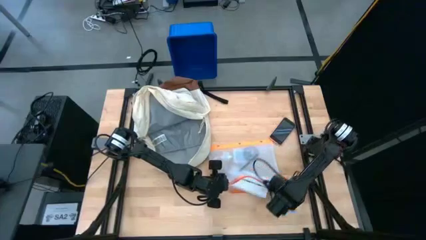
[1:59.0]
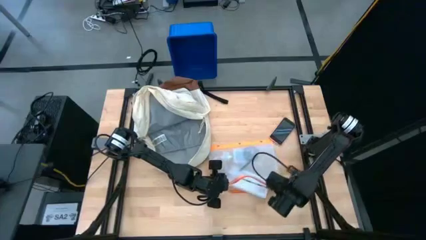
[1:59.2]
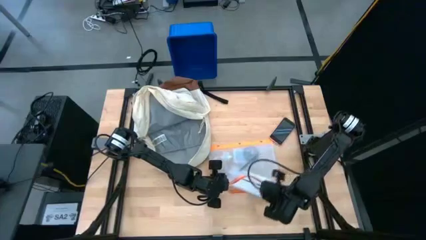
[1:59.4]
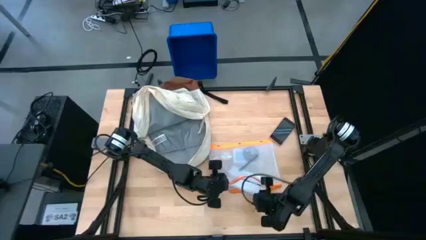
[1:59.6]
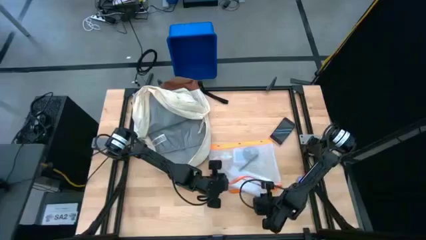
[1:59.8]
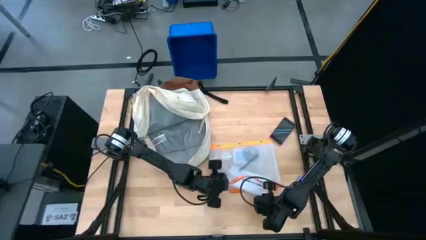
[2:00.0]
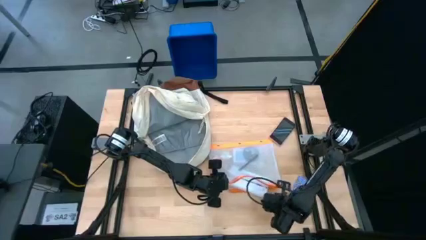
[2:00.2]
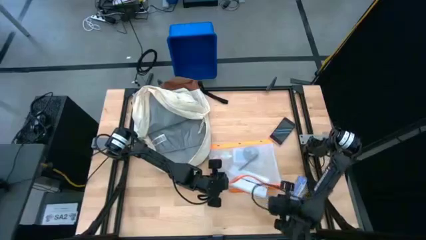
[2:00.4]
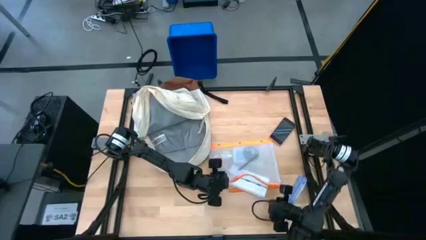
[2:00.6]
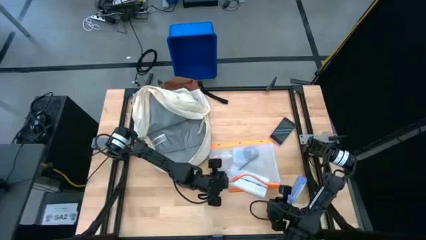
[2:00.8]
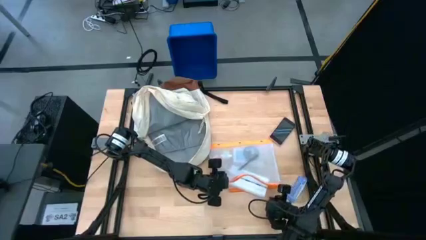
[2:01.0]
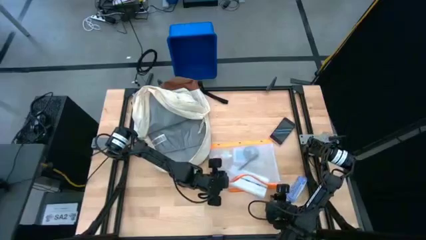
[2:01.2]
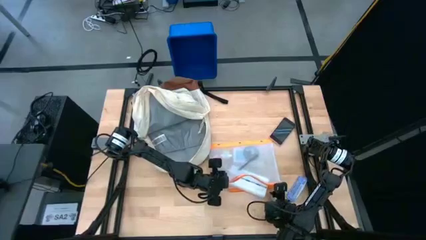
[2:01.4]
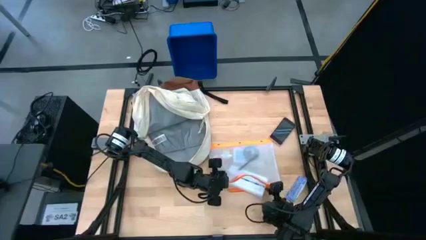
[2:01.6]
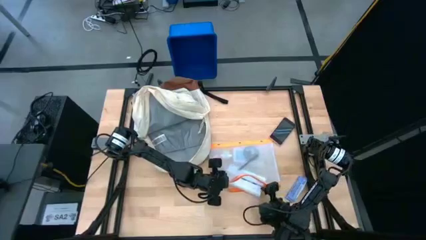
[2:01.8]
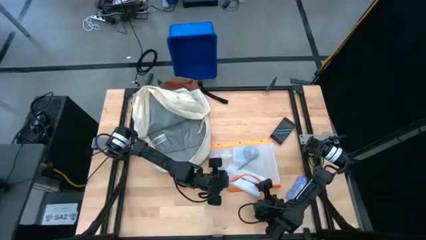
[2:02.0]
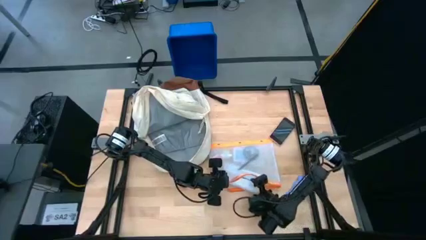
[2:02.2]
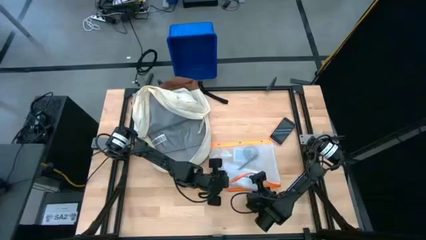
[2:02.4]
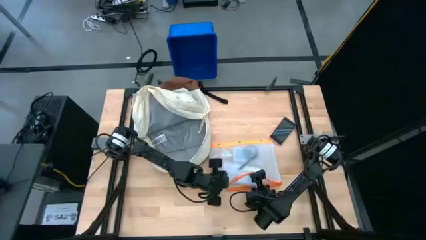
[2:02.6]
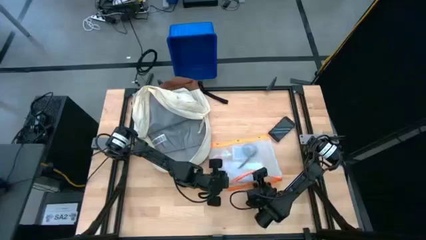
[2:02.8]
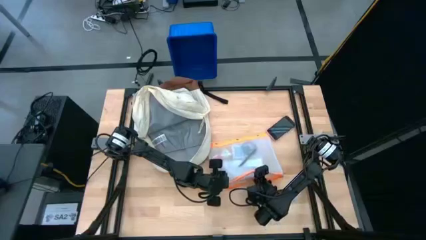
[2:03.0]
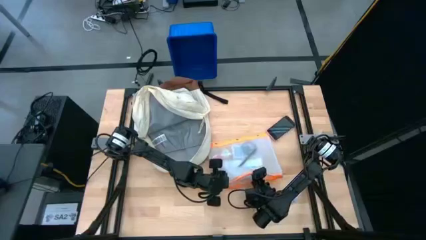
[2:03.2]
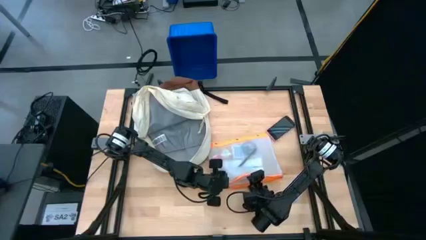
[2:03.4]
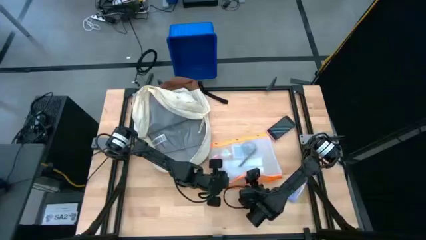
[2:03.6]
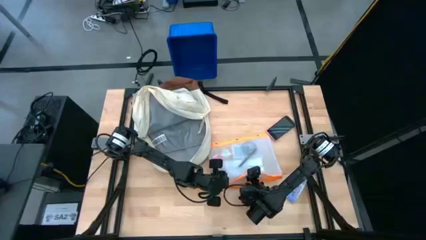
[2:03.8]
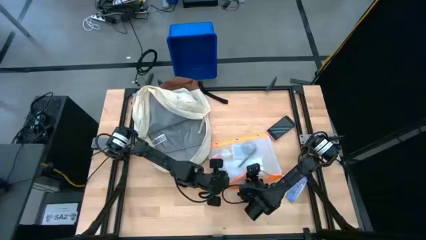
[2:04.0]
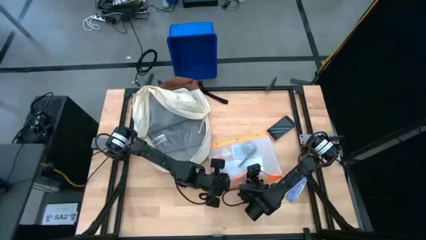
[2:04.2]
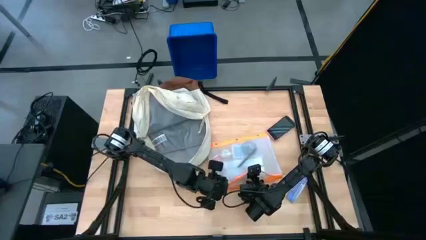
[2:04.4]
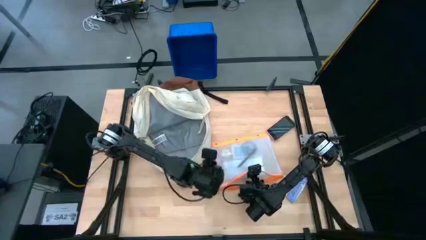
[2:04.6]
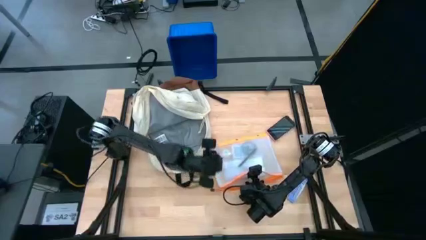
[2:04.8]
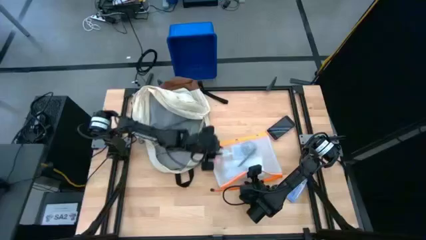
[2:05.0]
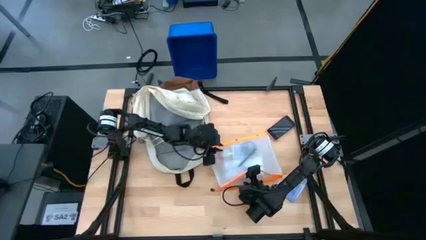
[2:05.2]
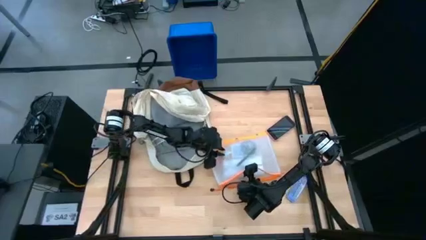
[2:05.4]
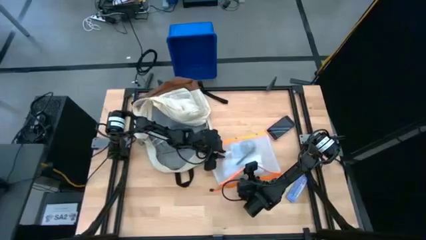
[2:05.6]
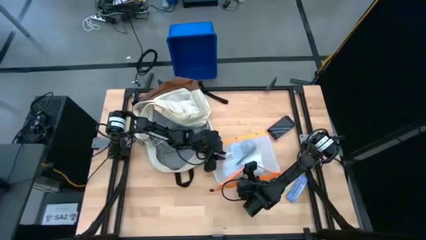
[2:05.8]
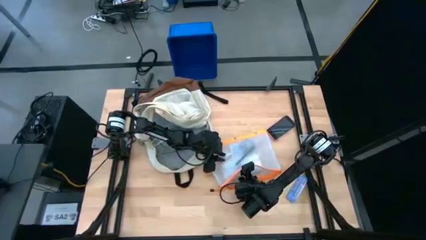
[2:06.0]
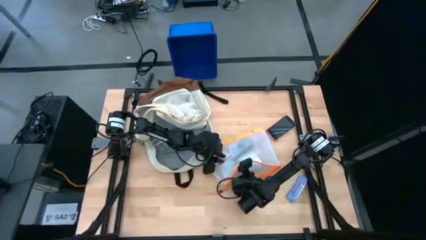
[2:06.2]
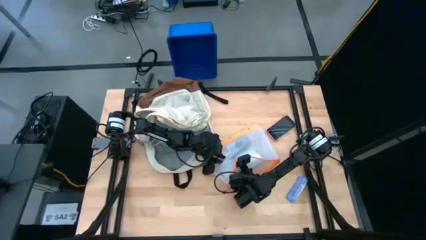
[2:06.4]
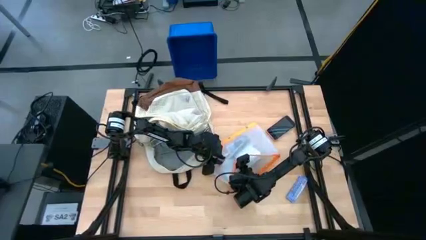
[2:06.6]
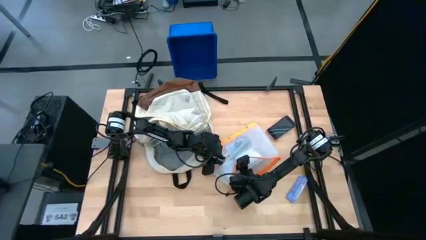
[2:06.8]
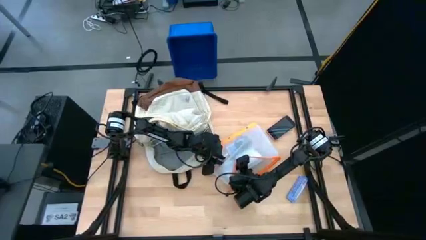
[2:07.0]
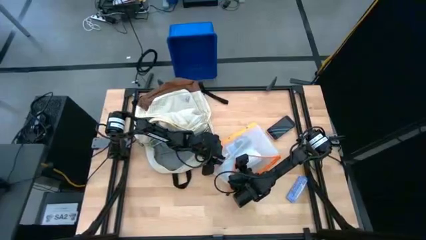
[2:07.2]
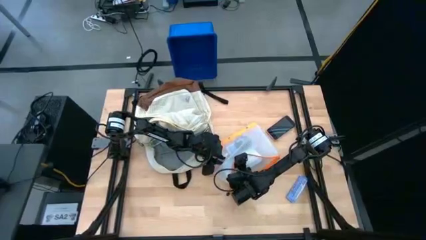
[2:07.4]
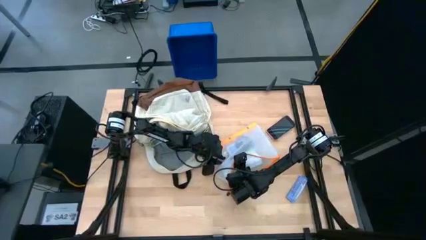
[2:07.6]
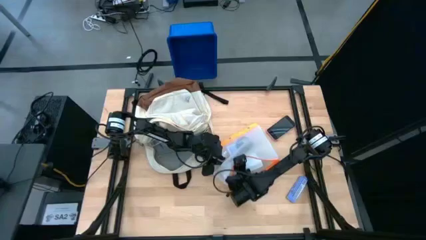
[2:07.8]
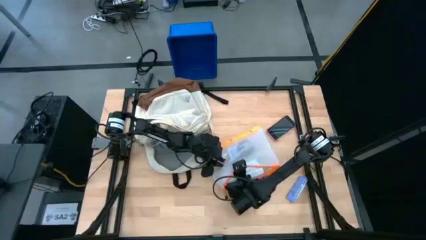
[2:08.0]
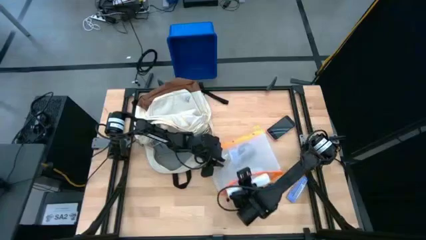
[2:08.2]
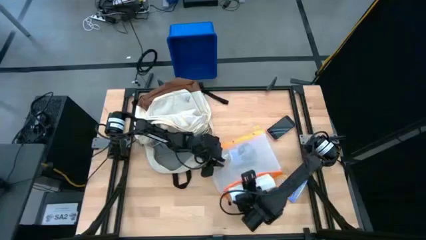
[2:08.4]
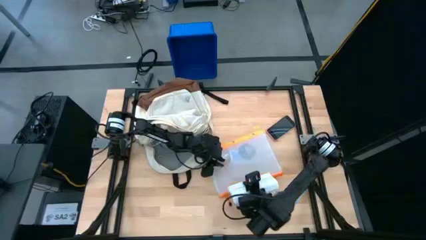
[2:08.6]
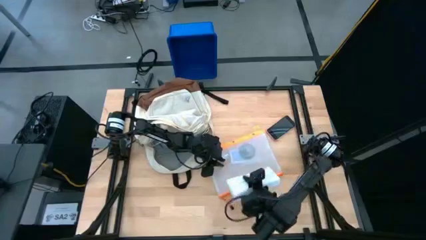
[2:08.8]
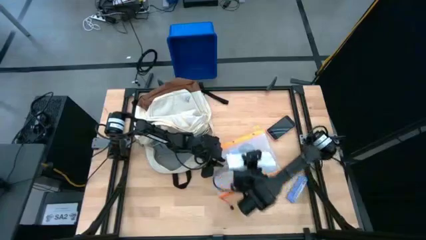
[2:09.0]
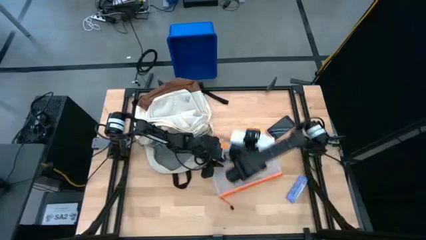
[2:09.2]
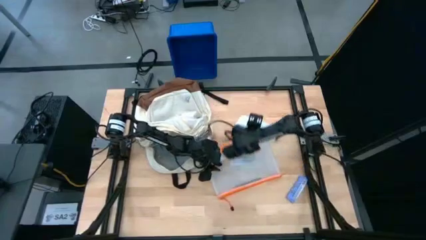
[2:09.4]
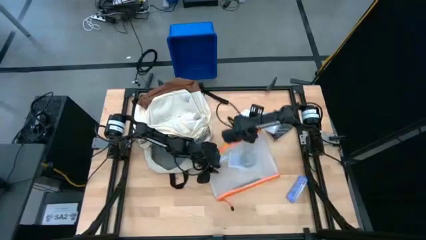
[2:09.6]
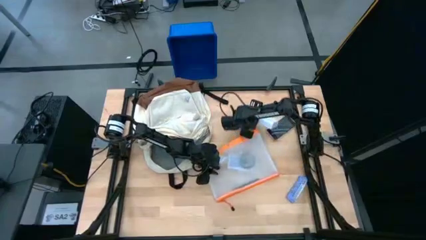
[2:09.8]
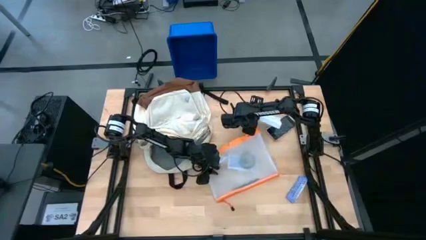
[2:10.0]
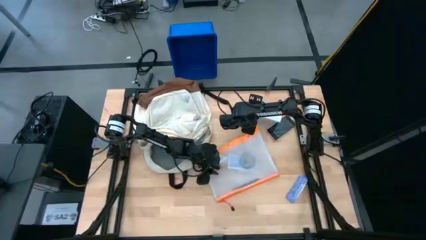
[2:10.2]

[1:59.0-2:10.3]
Task: Unpack backpack
Remove the white medicine organizer from the zip bag

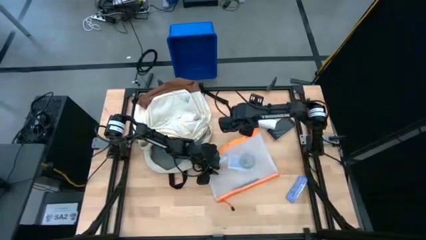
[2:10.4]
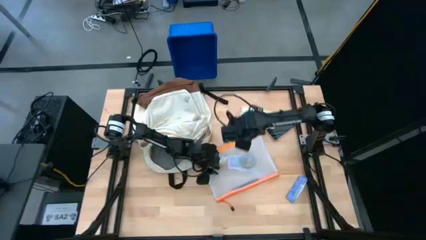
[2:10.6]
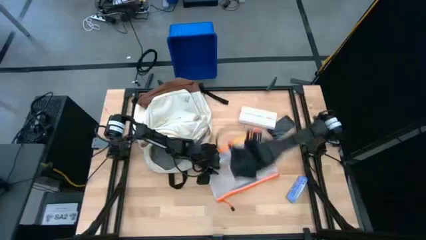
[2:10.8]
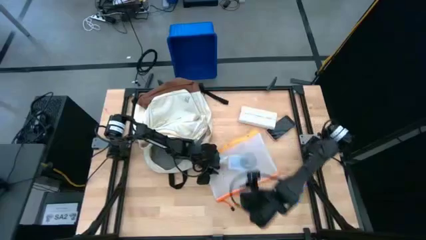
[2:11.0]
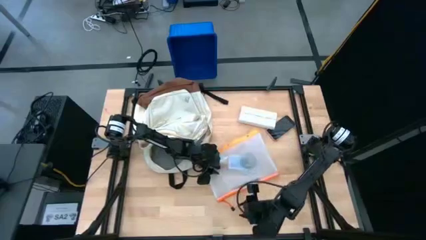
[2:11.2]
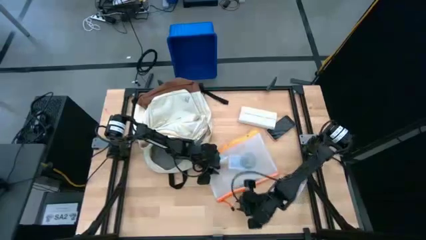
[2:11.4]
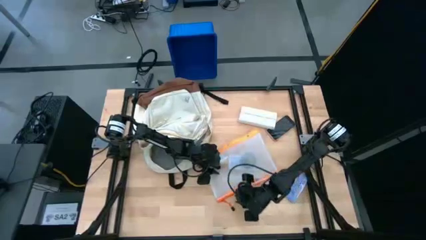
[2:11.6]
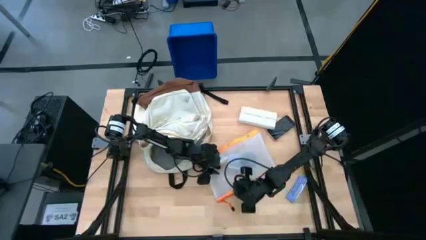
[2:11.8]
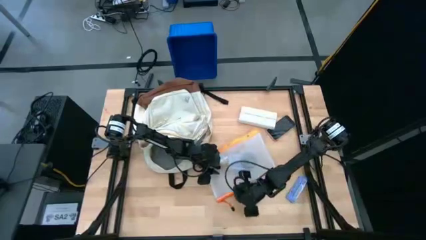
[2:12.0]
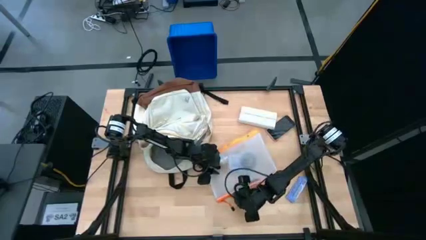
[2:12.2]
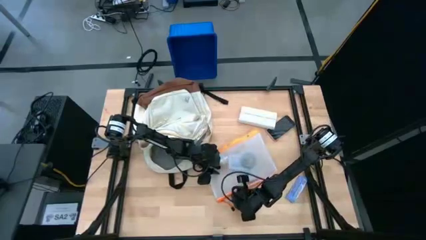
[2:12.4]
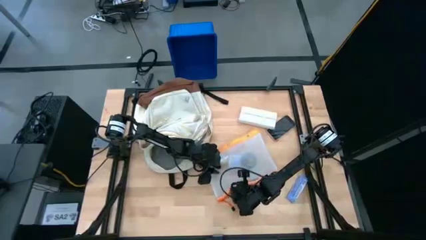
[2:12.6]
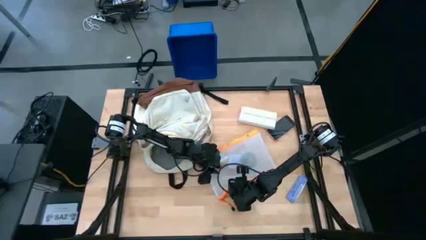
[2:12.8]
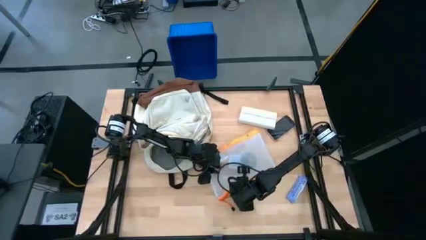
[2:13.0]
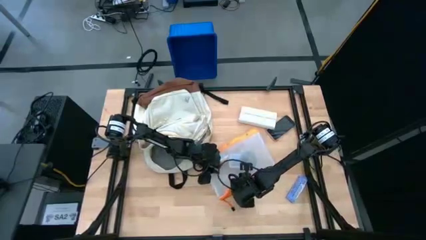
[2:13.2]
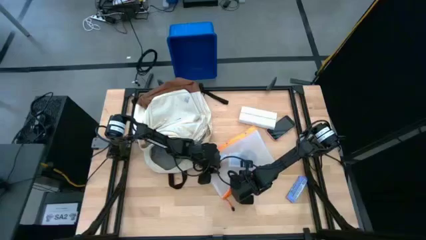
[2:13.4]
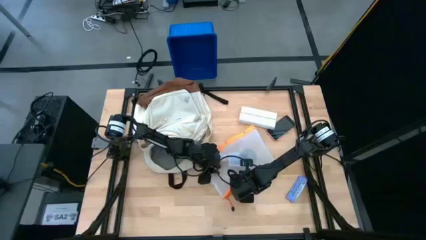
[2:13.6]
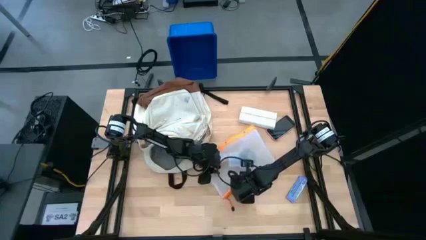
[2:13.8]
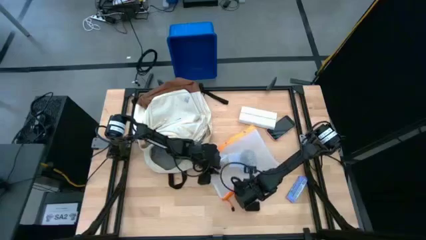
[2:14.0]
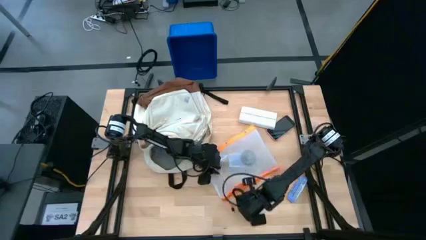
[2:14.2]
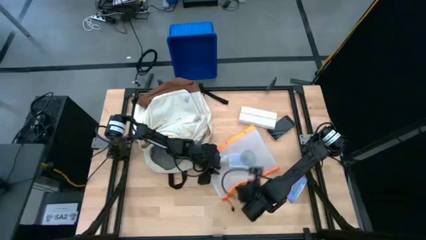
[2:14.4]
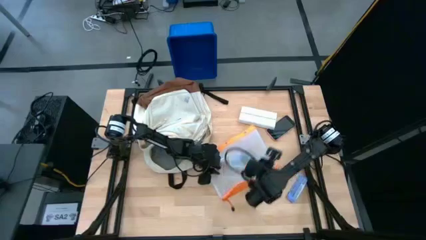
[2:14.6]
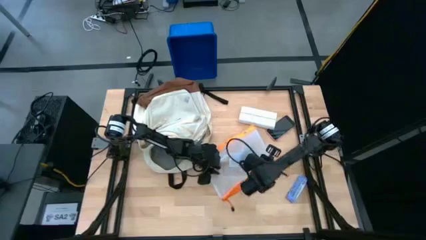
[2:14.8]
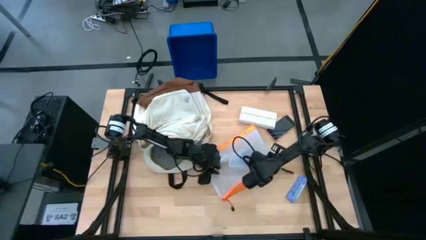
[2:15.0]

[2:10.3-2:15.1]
Remove the black pen from the zip bag
